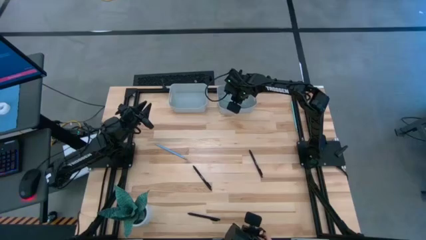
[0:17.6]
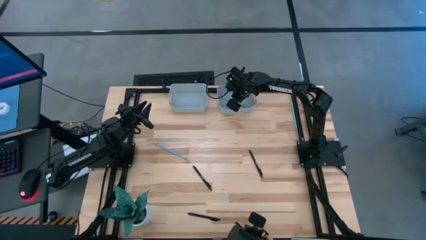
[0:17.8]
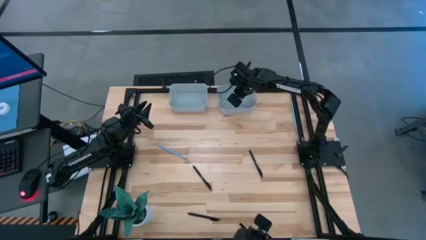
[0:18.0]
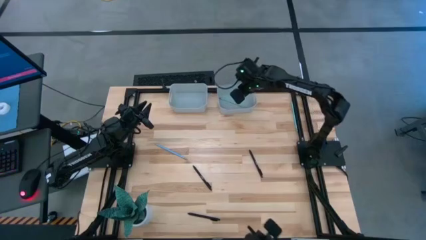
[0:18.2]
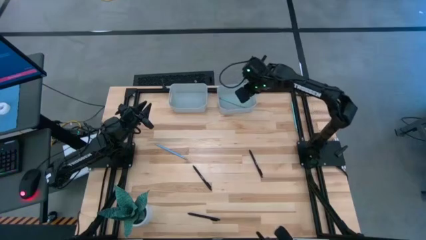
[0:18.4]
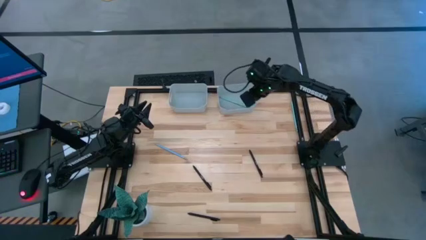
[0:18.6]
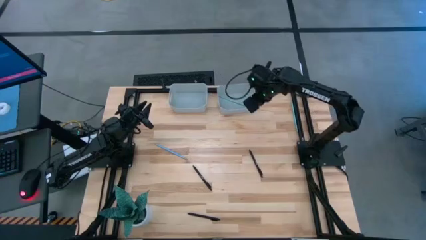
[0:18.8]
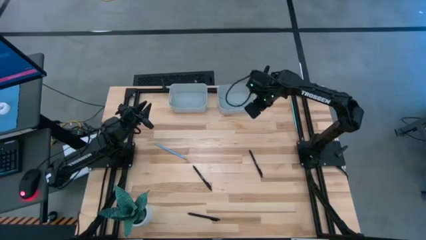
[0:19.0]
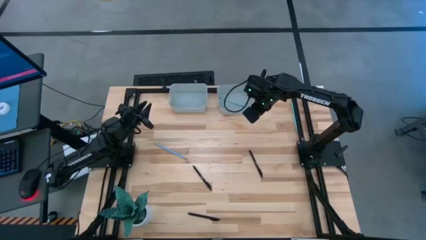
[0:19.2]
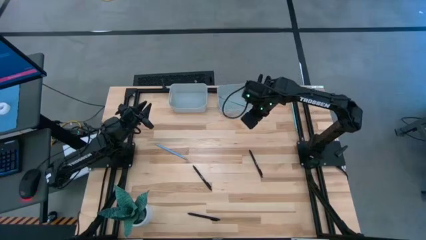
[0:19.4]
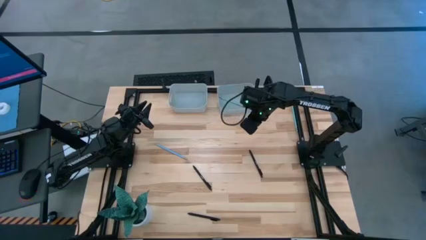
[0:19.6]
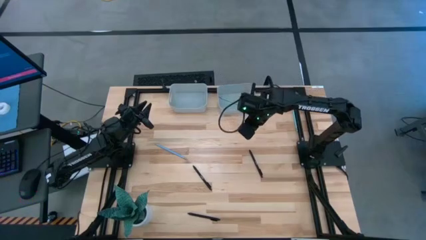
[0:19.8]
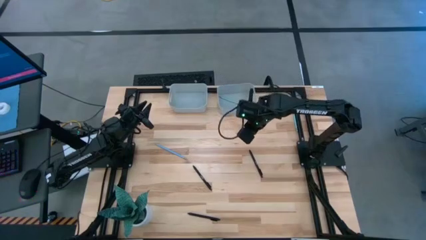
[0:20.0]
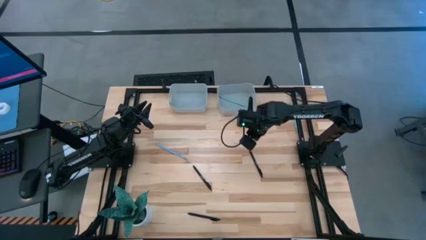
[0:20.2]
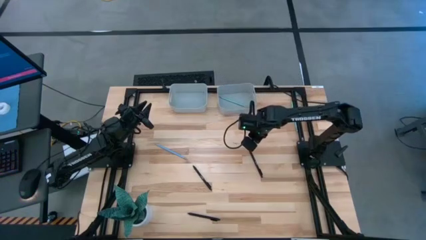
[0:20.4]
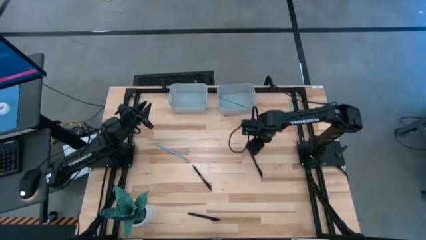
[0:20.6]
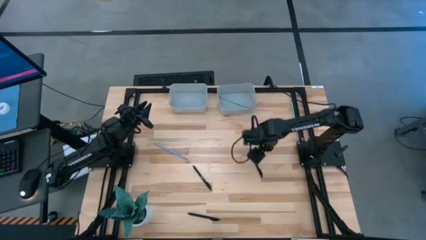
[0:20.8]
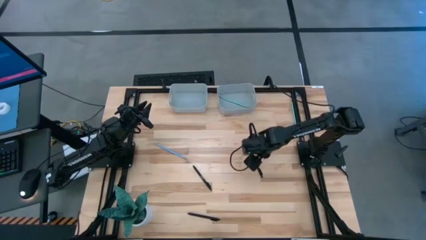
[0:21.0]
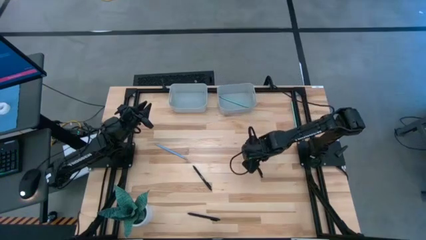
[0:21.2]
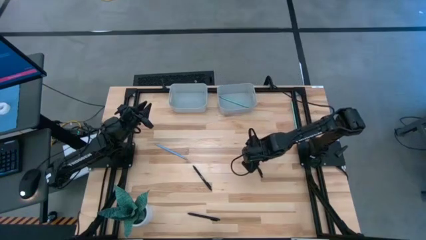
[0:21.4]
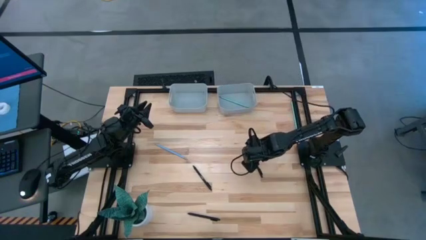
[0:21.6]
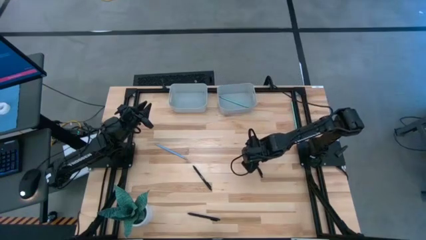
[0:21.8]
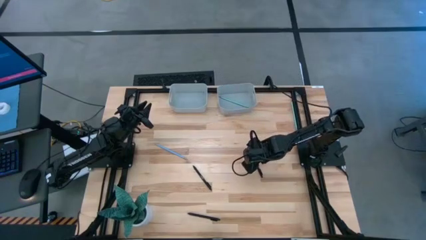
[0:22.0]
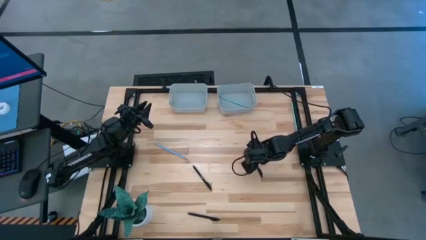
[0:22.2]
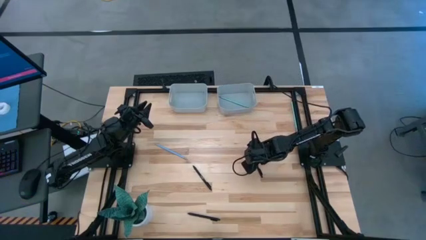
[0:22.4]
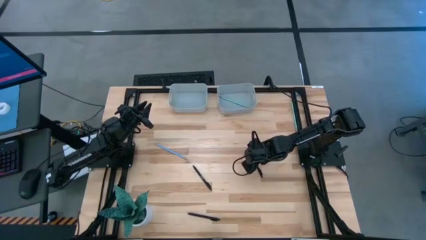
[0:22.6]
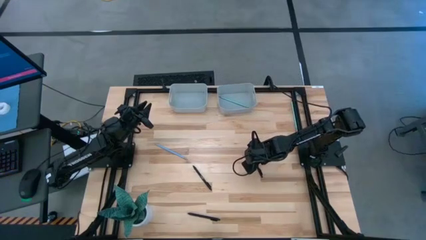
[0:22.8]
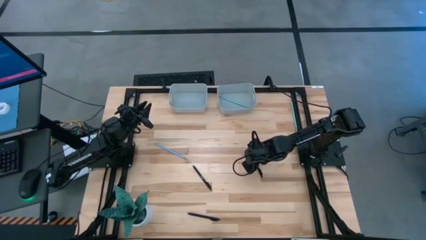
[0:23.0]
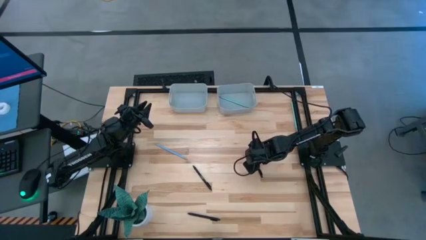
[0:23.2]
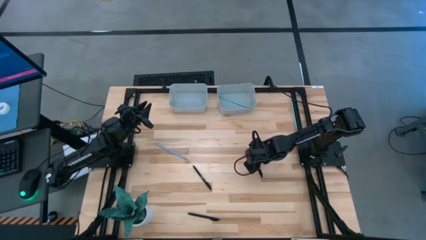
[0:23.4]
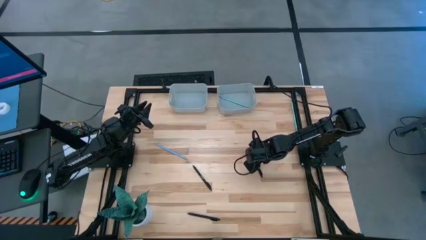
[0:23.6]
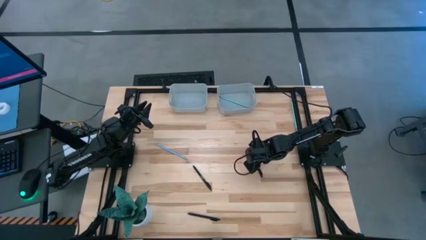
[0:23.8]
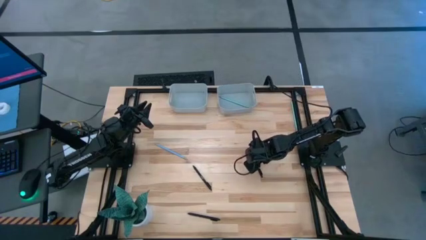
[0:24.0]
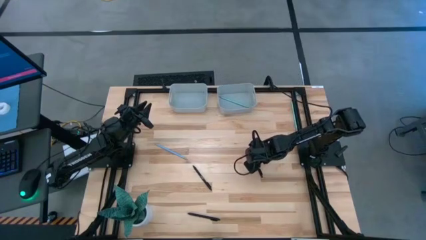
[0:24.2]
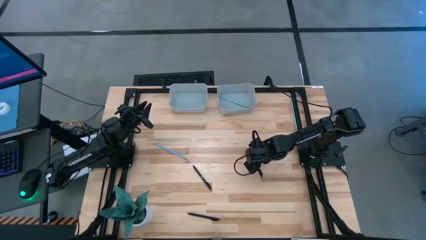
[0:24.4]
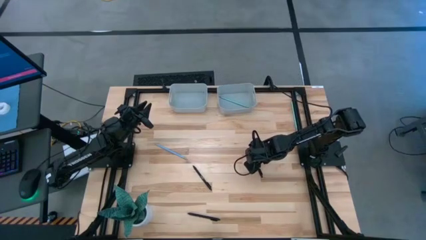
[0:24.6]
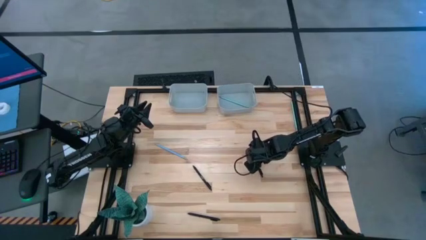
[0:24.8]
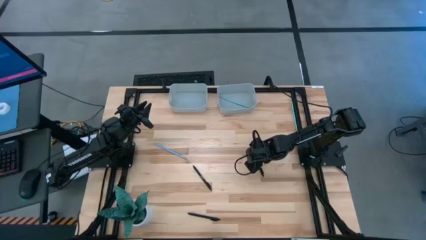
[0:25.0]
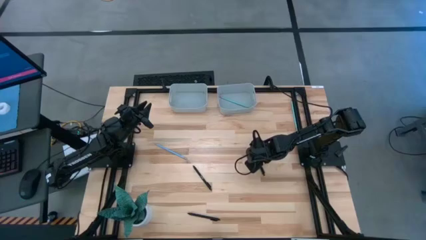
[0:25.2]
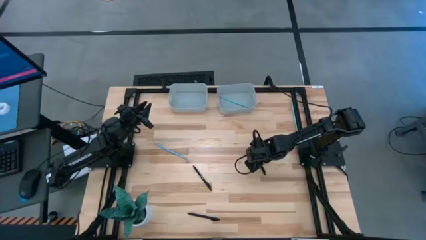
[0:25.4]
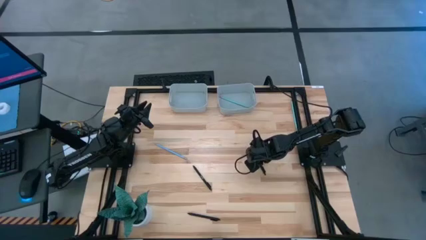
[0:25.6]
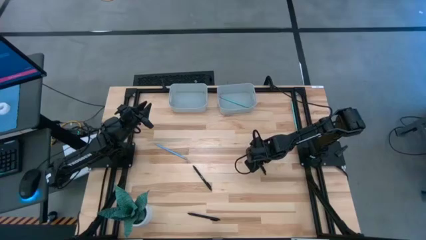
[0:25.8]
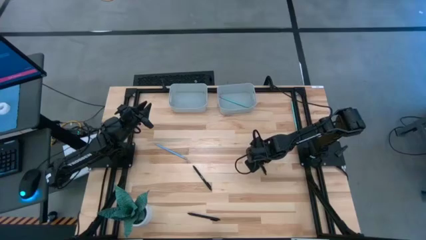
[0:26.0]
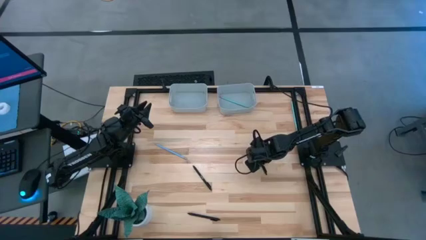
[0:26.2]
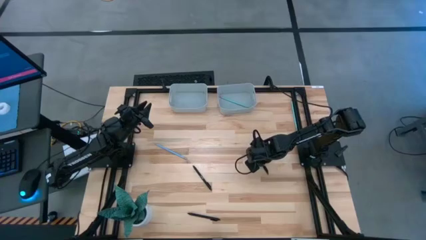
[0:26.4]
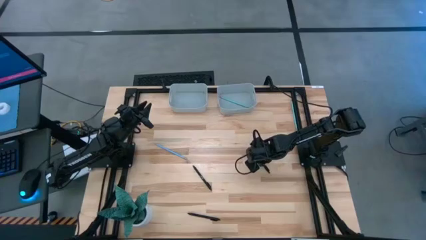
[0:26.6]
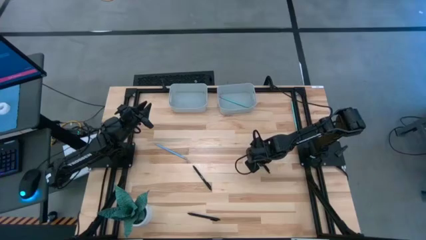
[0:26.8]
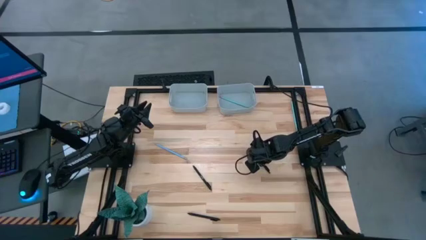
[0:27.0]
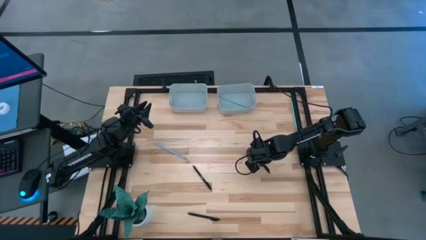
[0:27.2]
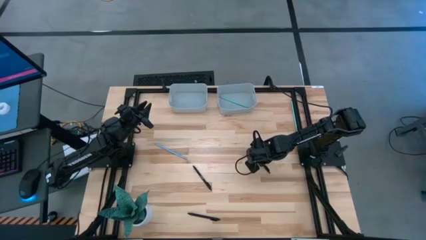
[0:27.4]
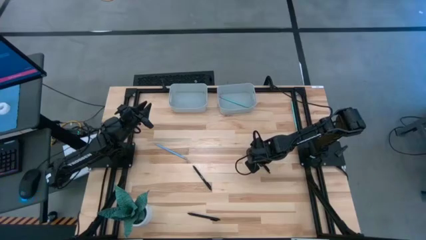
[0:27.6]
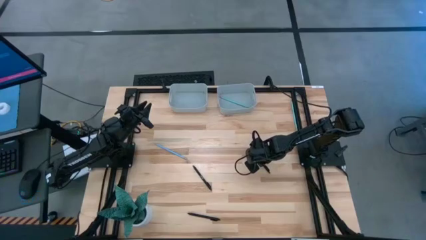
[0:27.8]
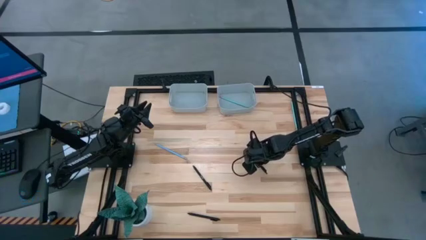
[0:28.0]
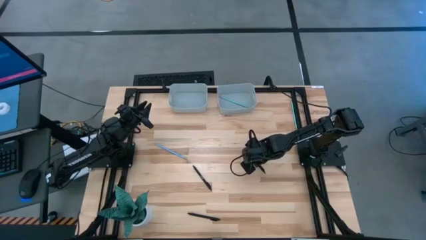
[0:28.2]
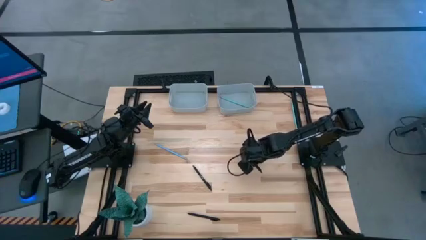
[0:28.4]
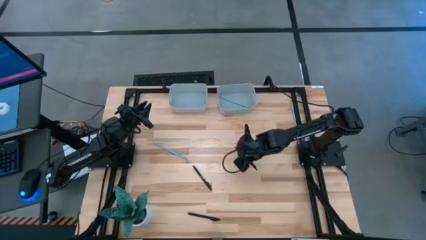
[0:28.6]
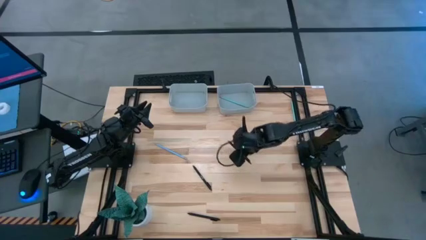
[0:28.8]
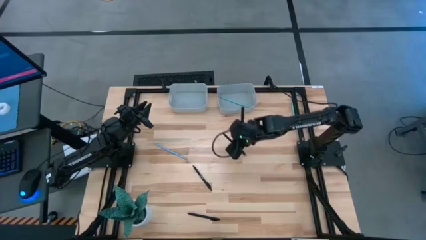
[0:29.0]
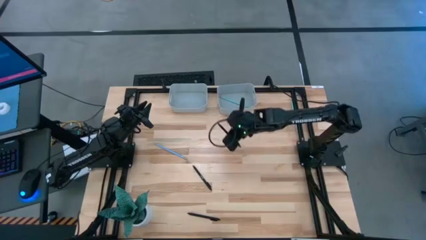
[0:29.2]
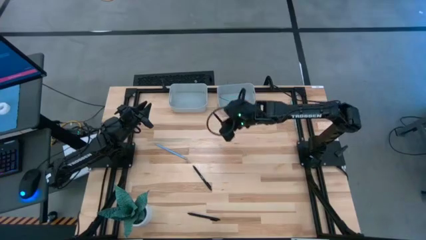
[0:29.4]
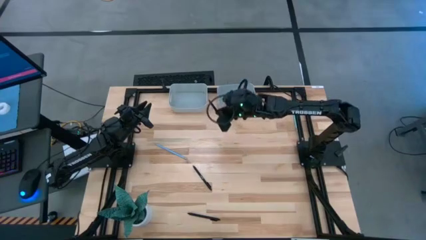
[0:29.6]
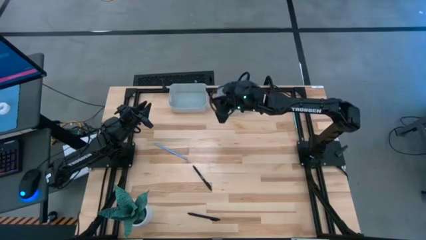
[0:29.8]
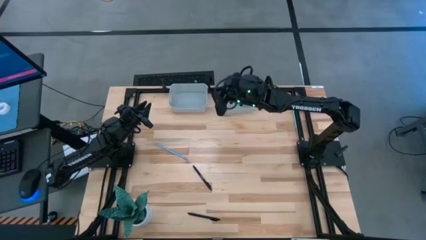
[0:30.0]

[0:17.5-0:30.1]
Task: Sort pens & pencils
Put the top right black pen into the left gray bin

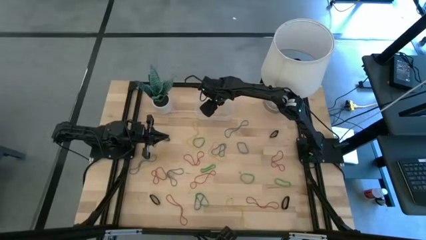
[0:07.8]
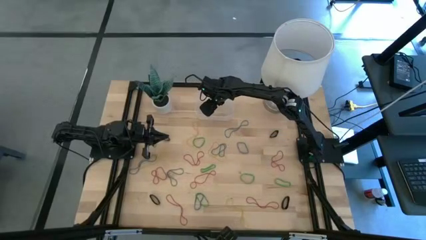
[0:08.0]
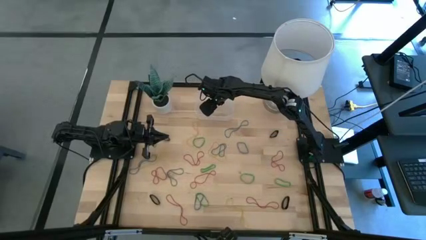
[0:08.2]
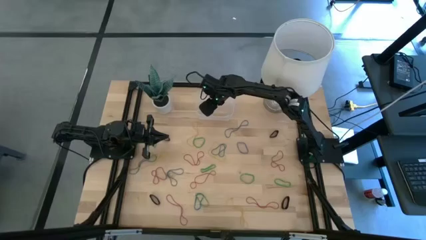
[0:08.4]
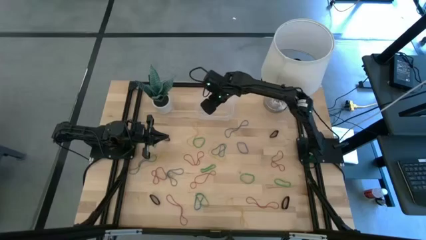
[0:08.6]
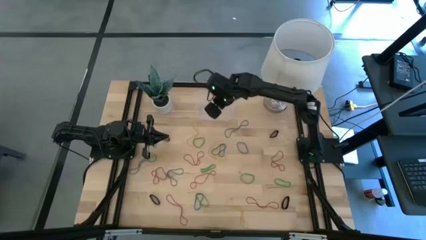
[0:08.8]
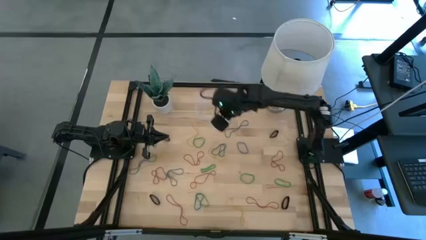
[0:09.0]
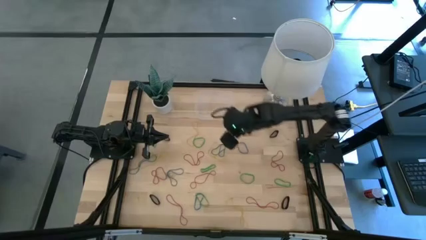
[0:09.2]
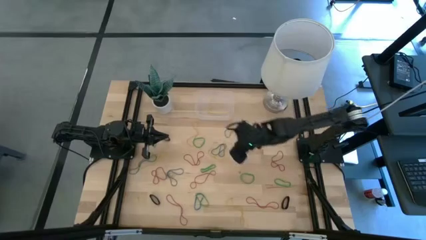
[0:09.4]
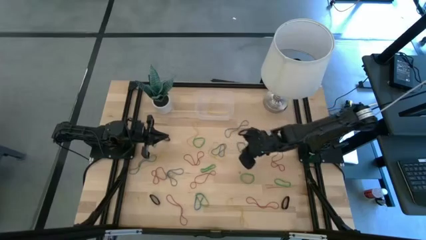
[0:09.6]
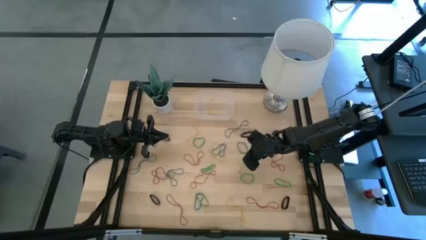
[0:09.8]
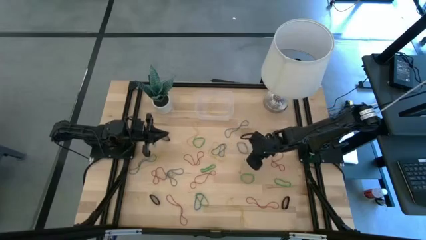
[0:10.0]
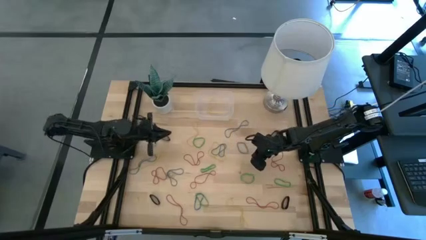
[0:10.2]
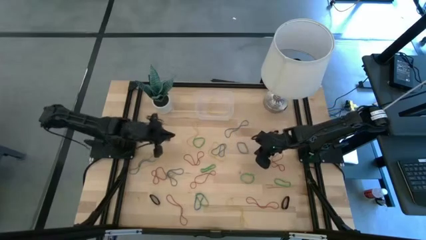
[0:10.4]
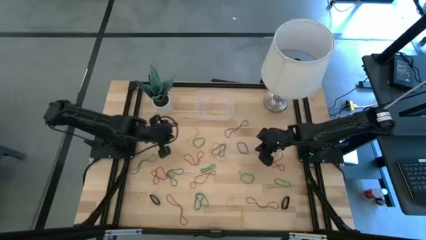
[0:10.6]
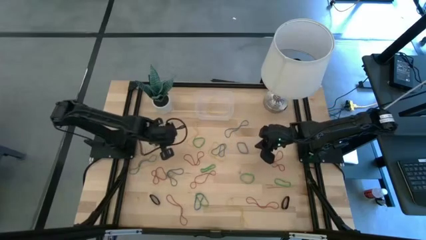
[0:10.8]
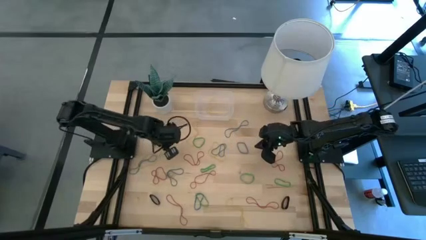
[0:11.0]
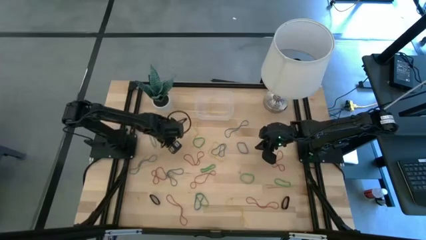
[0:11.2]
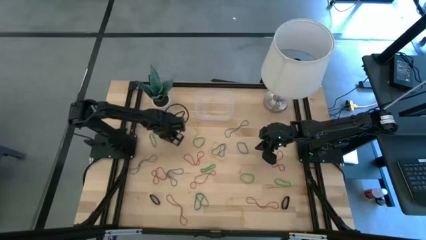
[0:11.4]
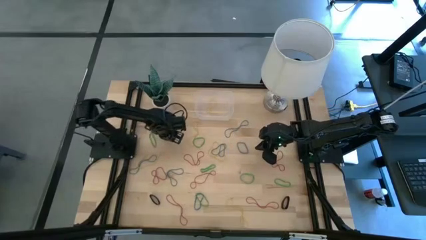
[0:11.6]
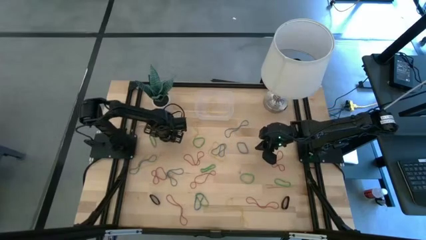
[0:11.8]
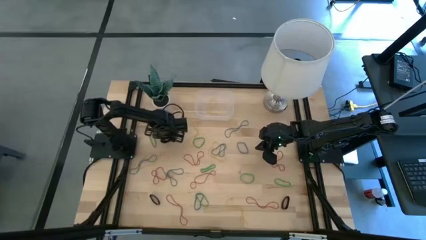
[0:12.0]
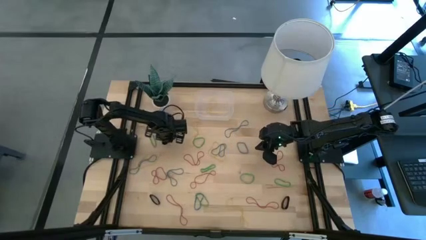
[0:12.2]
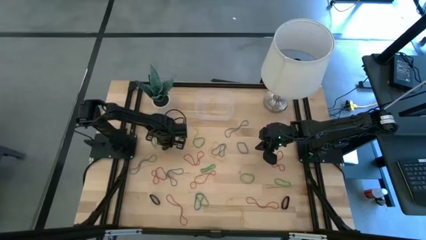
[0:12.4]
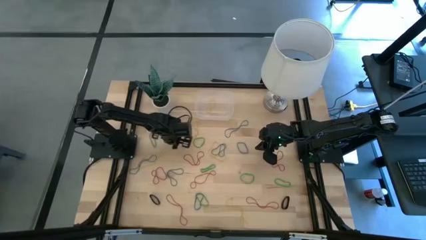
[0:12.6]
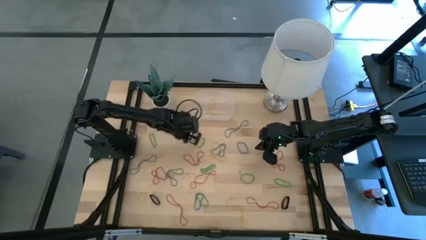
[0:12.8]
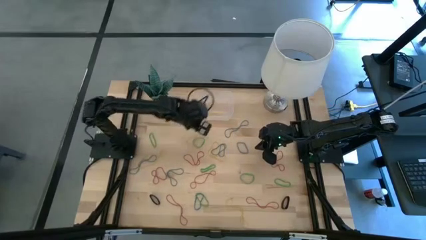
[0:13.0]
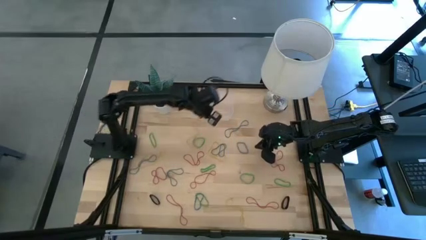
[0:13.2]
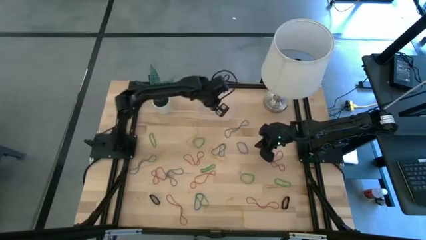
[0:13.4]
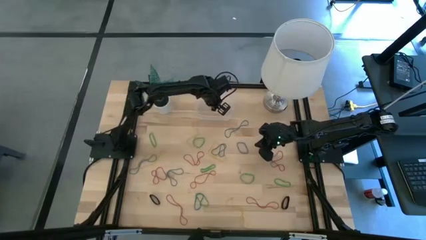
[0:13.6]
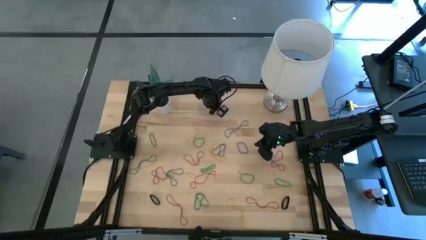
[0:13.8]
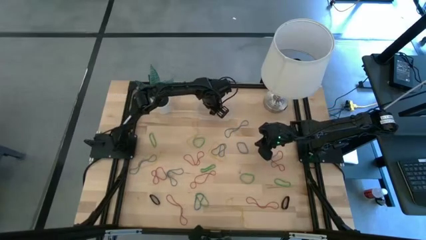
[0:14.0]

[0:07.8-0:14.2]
Task: Pick and place rubber bands into bin
Put the black rubber band into the transparent bin
